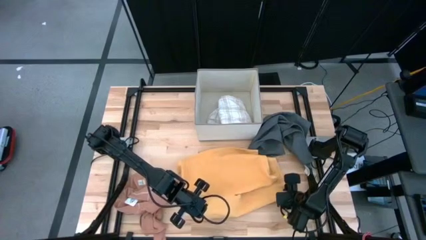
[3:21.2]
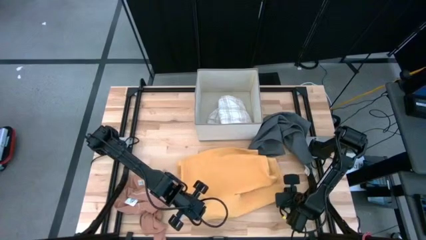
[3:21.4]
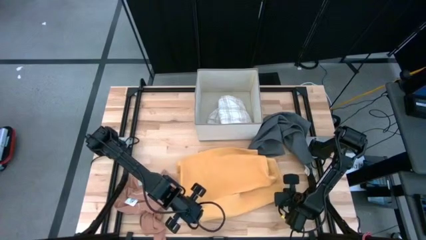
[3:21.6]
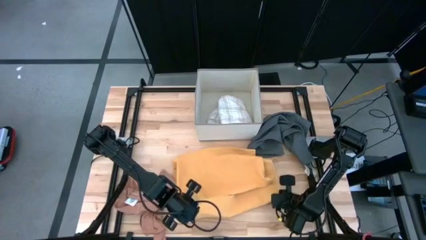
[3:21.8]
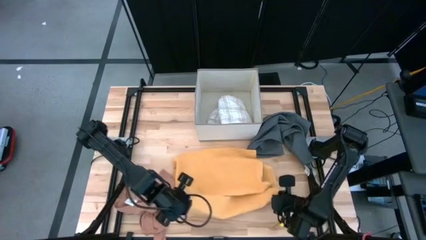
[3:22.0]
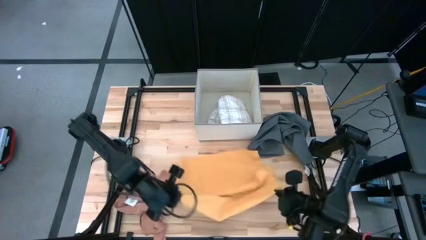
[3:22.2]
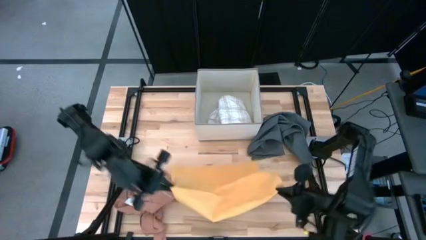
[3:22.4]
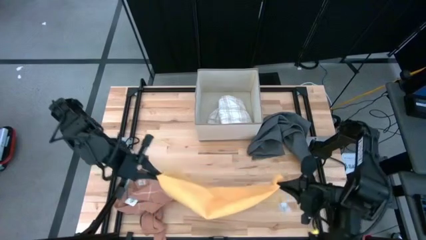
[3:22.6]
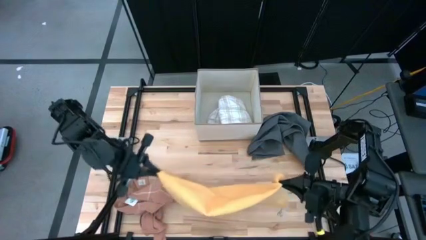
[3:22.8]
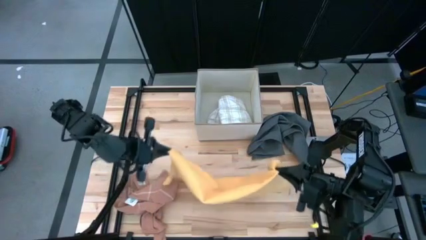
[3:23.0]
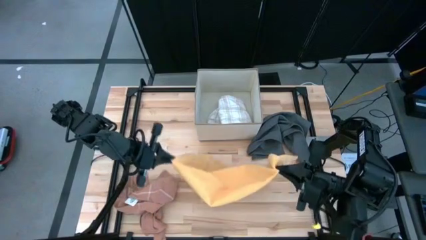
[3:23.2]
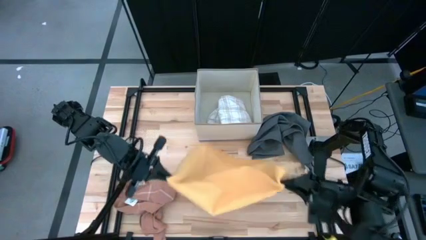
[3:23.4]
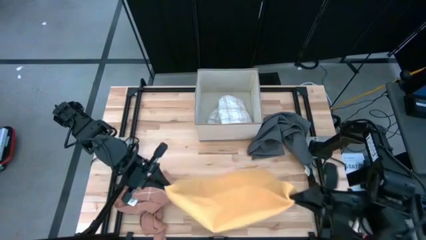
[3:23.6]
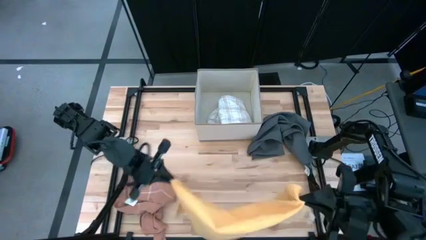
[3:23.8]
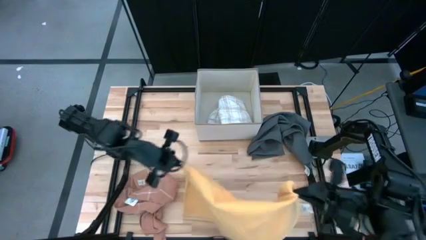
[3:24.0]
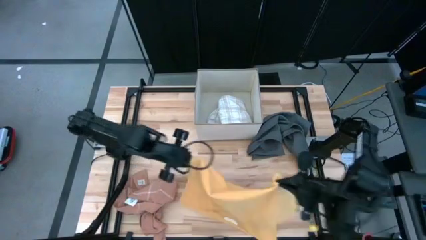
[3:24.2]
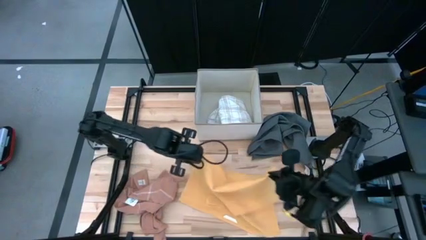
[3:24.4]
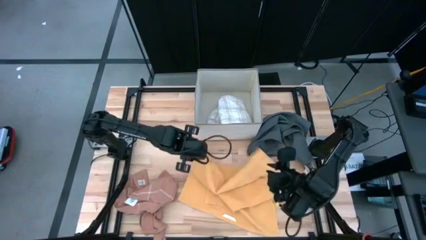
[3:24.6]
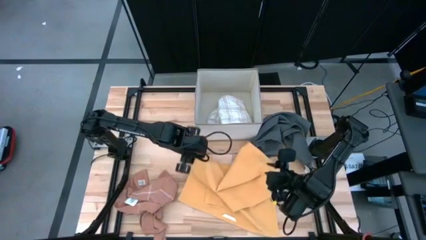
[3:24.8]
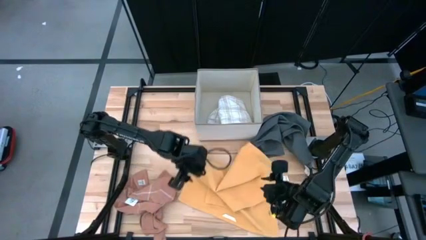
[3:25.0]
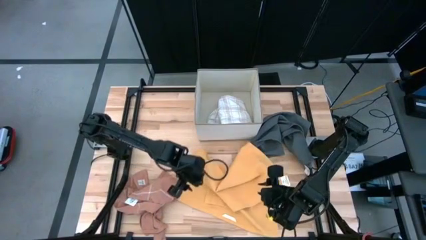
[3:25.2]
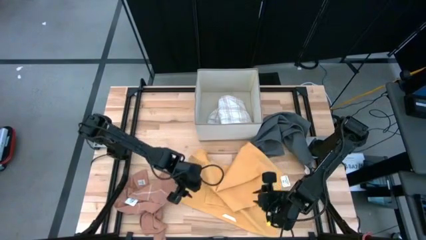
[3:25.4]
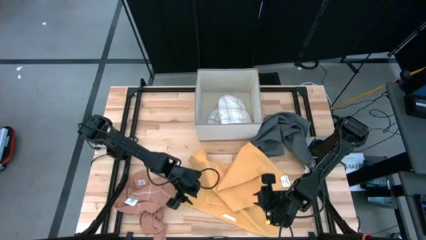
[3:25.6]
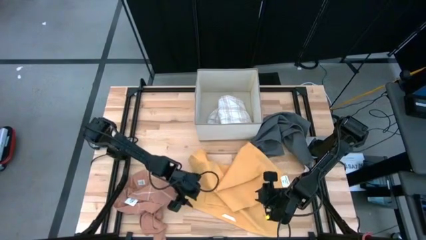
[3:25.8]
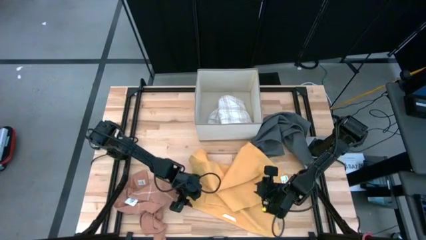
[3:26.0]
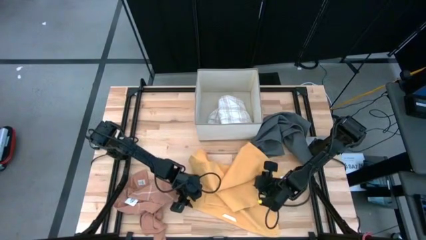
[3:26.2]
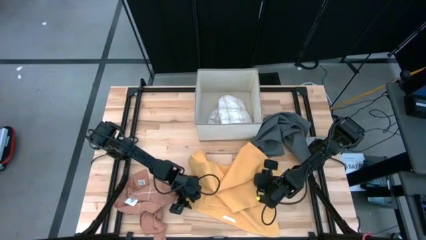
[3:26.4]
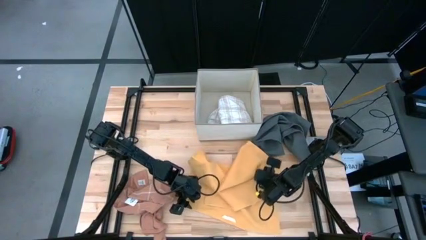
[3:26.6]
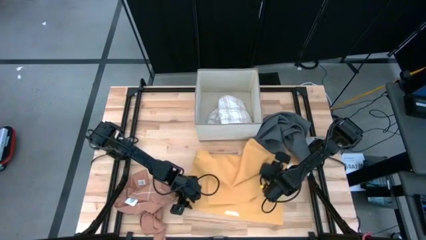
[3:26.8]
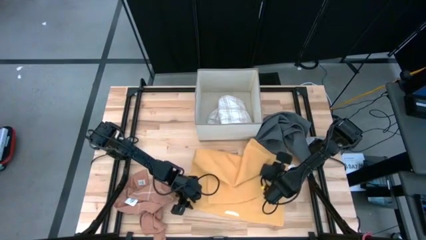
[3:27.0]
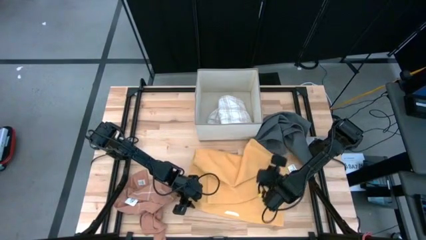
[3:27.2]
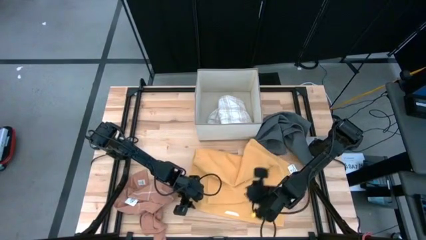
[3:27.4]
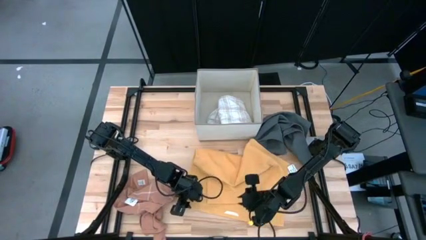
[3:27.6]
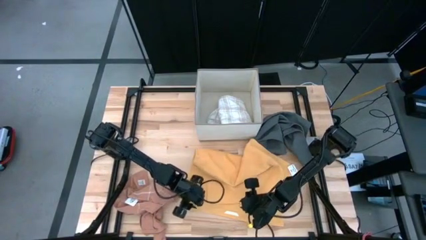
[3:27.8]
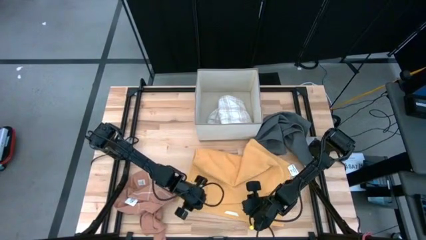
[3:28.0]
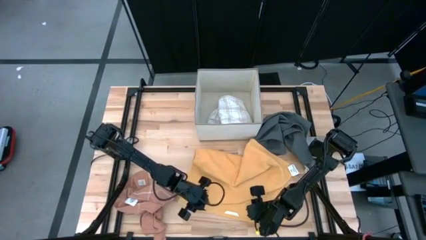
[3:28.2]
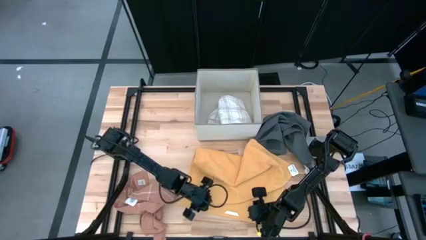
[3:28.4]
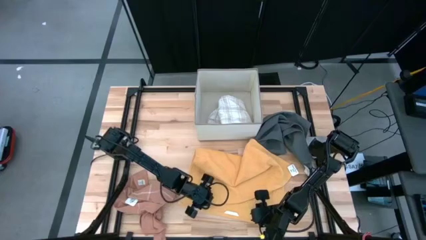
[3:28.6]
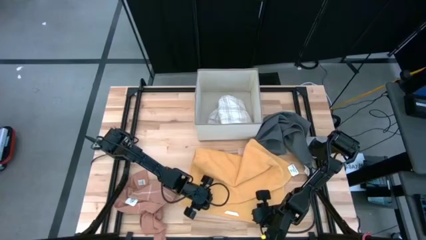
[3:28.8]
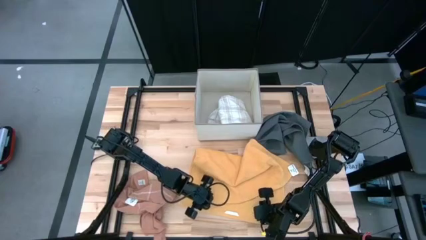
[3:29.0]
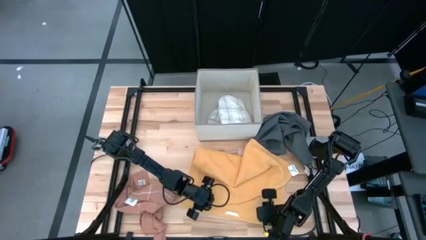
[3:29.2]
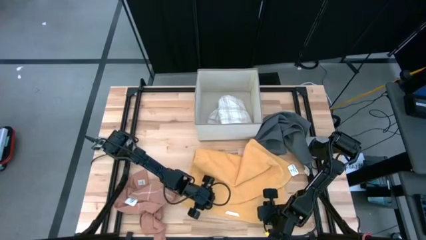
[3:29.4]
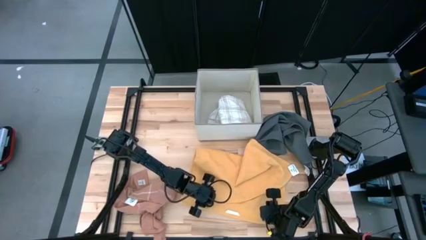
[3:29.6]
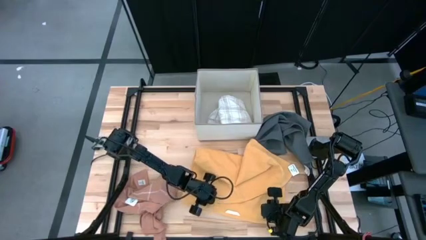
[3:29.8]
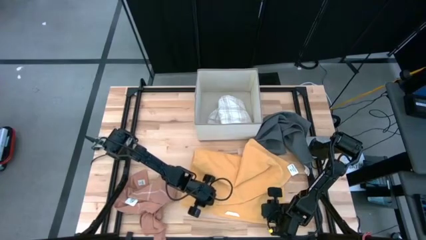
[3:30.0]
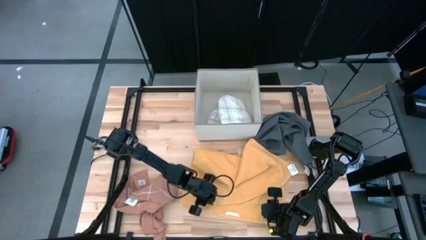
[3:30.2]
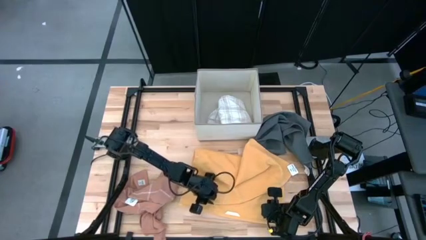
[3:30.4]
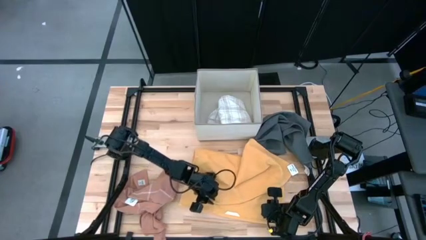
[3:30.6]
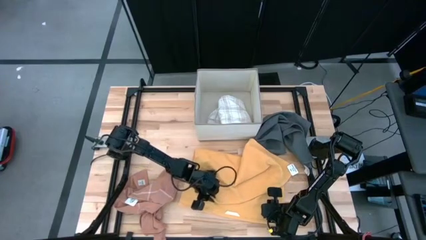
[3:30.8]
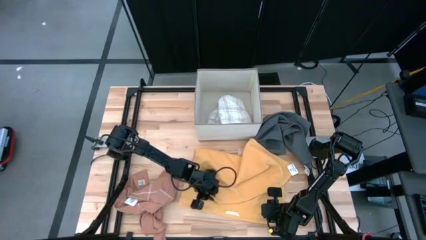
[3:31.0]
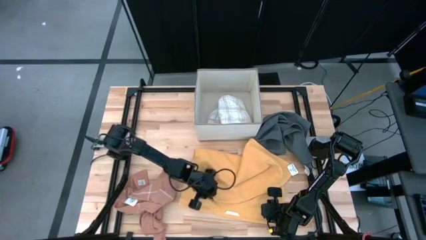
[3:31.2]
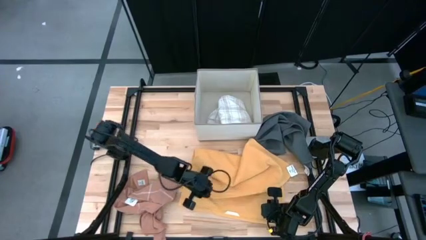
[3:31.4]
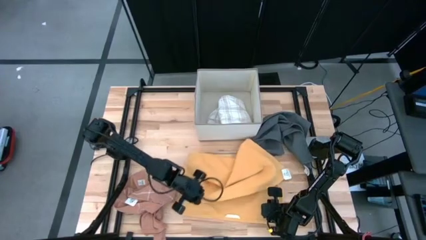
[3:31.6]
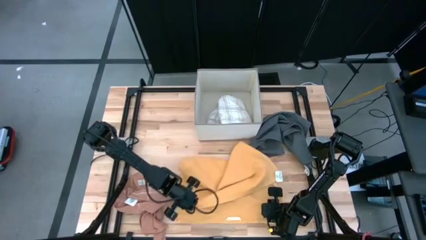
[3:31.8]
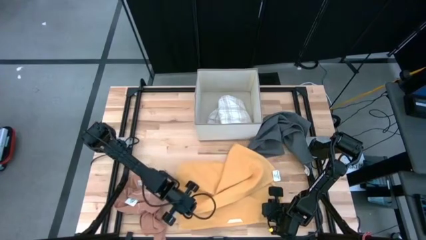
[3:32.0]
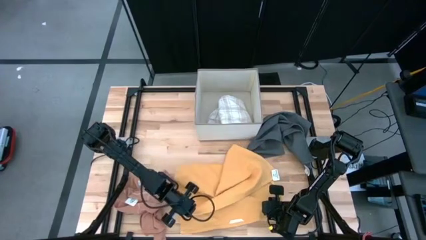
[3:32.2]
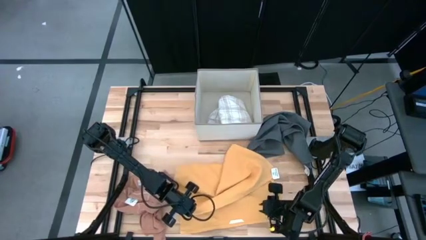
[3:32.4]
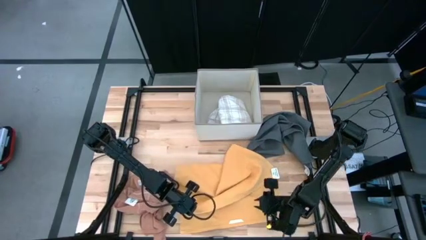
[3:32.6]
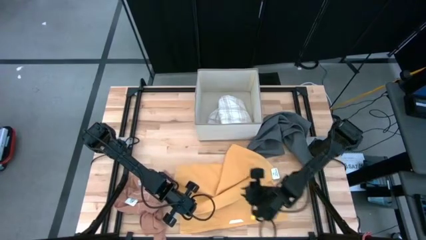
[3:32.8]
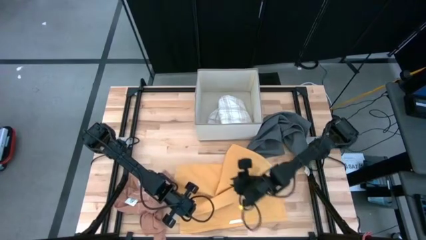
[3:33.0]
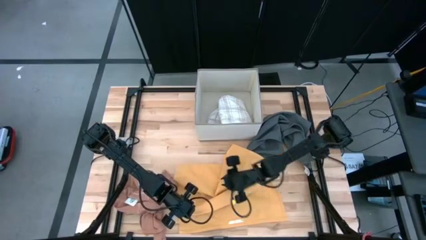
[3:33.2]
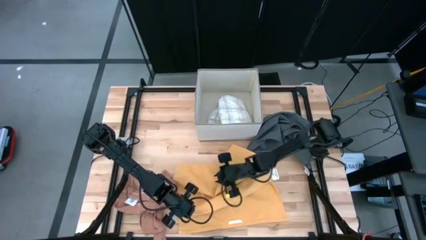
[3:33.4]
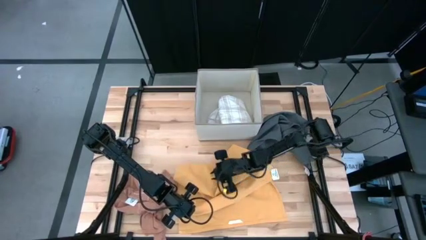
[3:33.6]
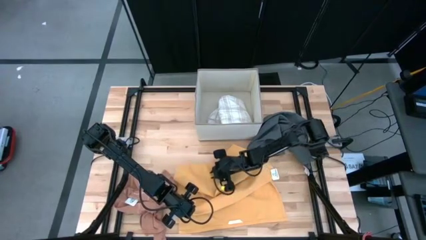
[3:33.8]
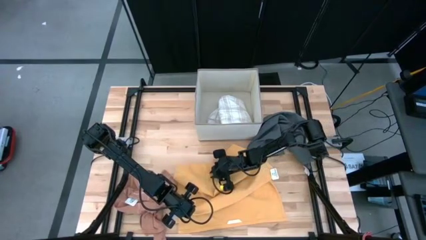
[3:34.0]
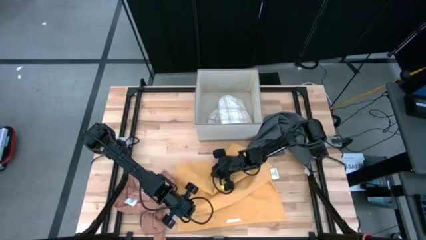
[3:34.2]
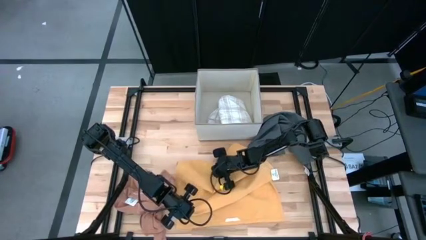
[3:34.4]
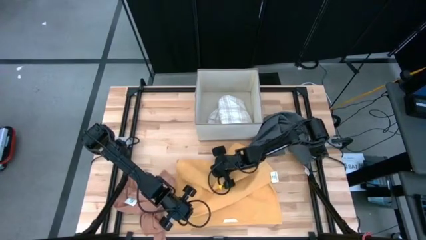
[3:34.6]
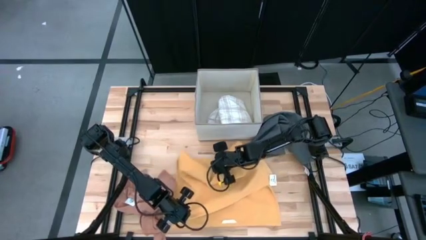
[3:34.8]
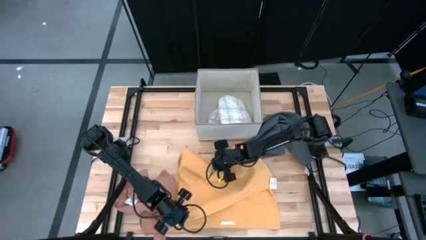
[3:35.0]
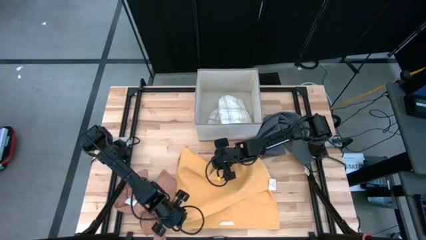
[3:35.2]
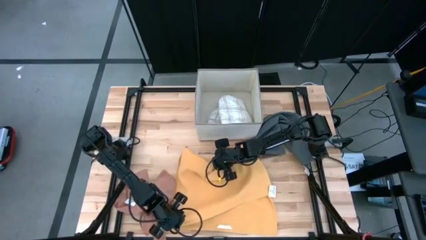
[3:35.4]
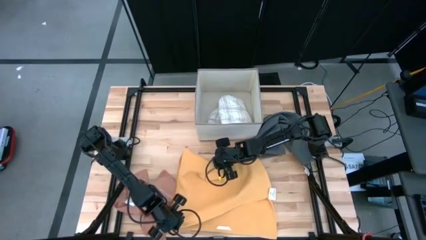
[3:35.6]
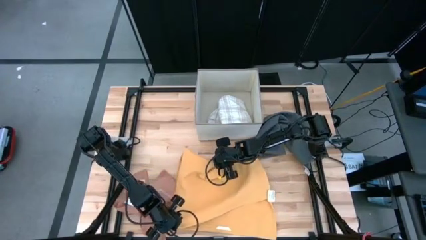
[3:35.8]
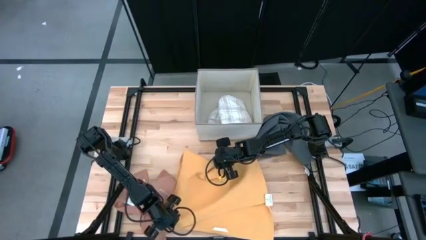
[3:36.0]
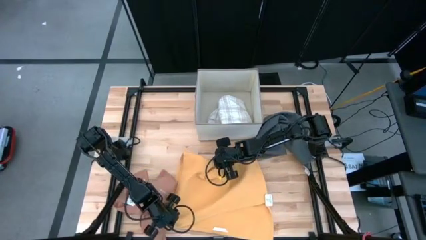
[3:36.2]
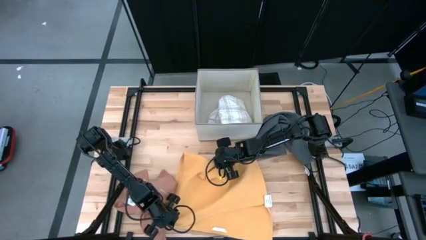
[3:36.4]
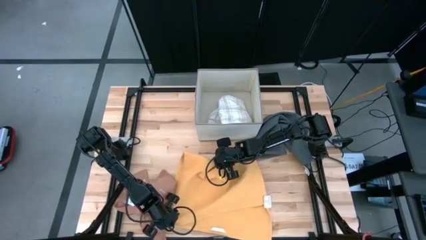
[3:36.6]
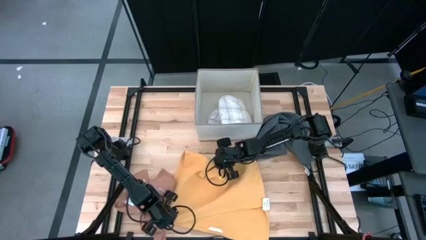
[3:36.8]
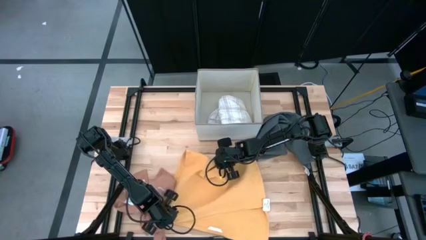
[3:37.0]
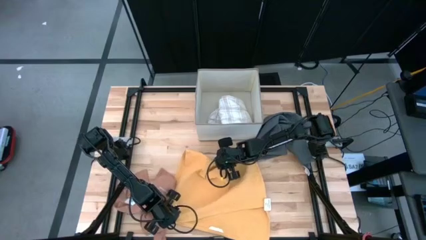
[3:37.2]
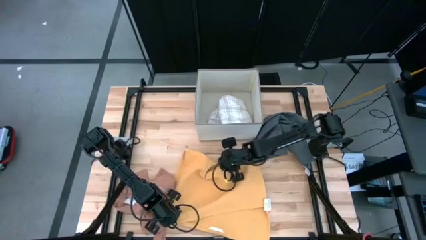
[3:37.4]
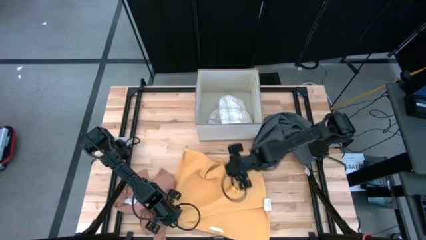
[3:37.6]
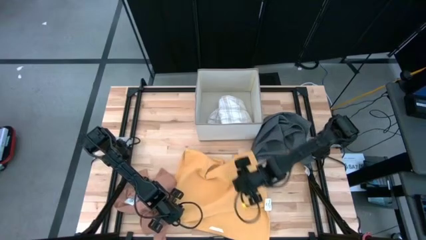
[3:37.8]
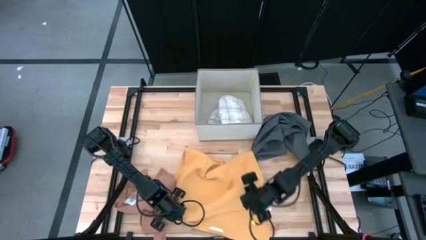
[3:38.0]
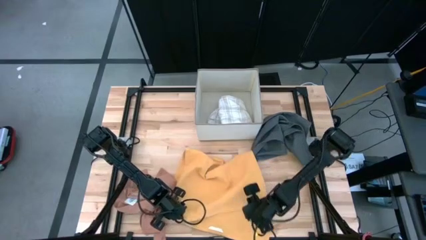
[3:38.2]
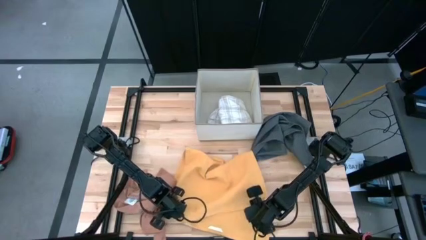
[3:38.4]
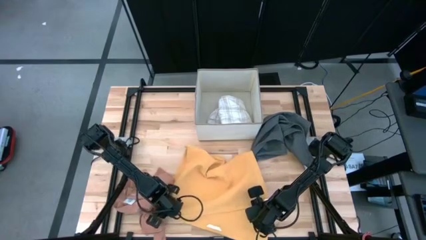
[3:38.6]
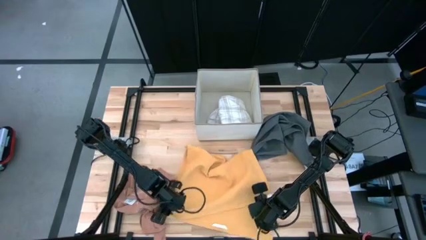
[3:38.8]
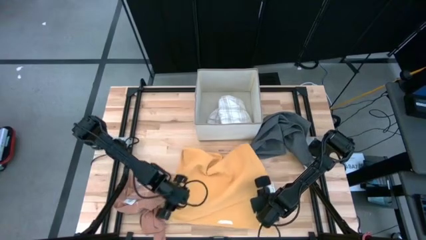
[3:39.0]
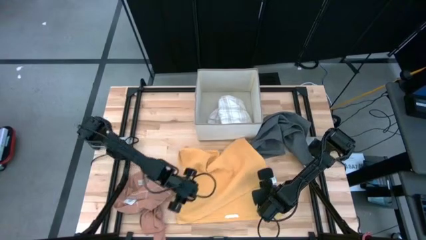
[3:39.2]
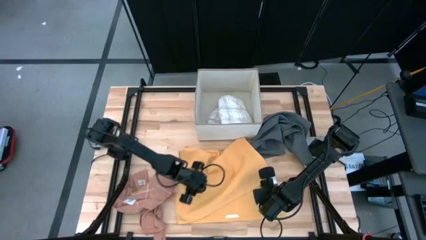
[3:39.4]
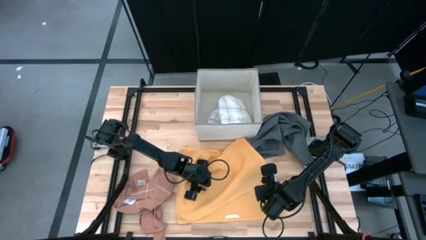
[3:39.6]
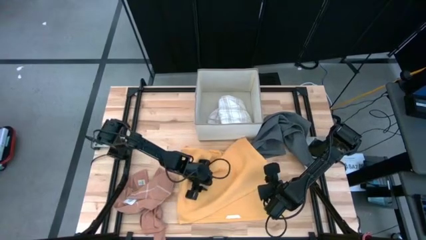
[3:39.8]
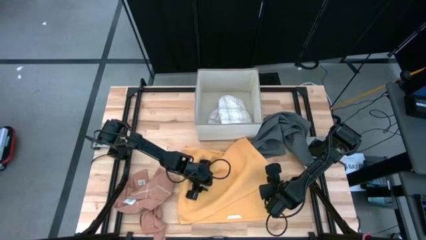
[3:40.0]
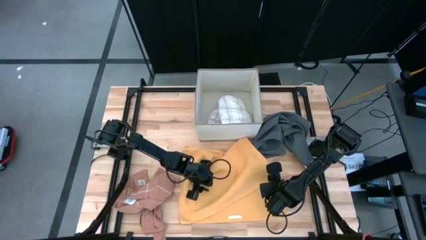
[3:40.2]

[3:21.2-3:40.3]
Task: Fold towel
Fold the yellow towel
